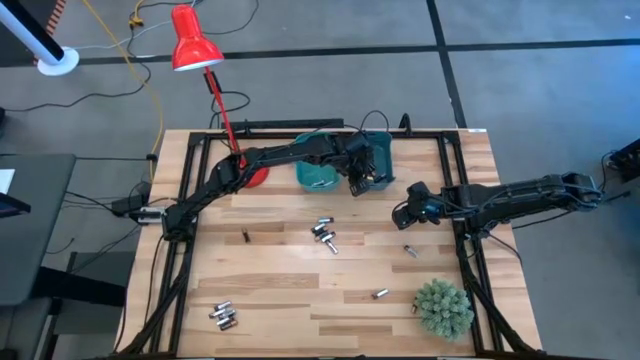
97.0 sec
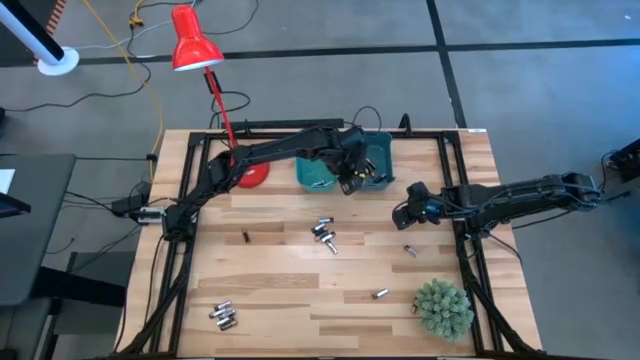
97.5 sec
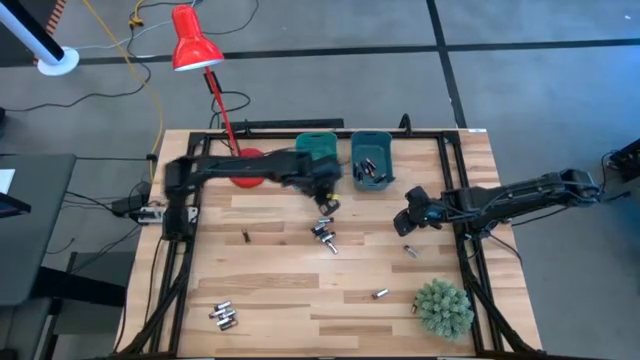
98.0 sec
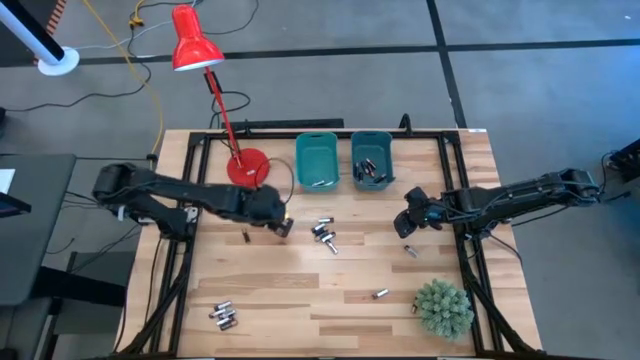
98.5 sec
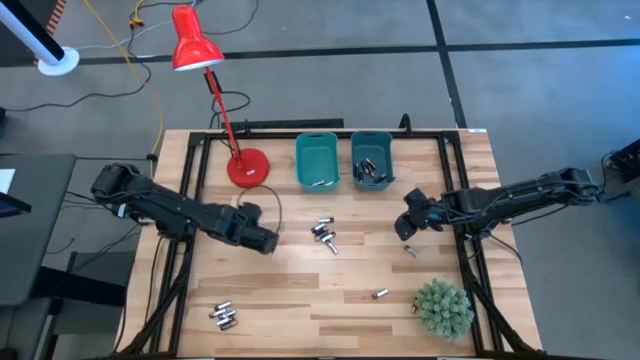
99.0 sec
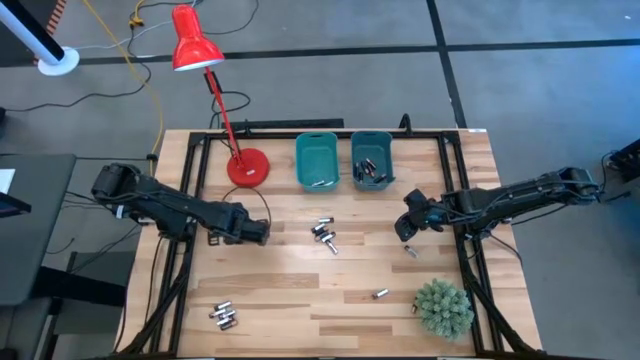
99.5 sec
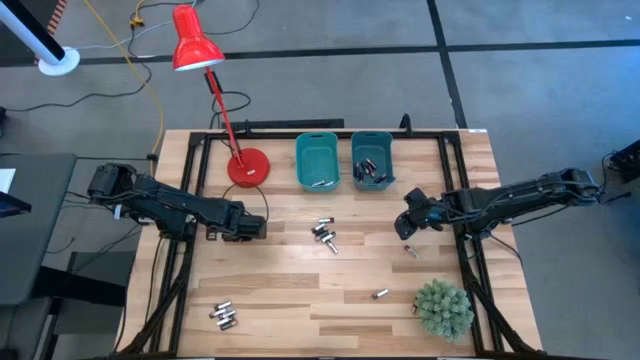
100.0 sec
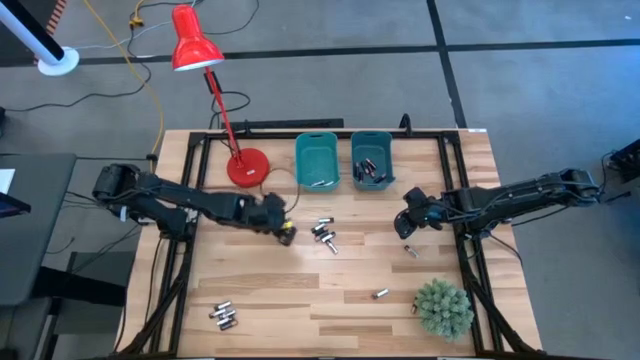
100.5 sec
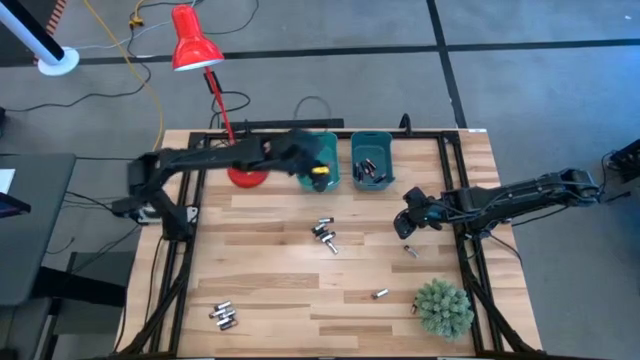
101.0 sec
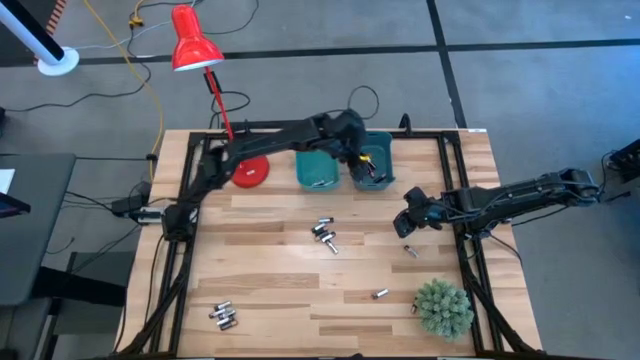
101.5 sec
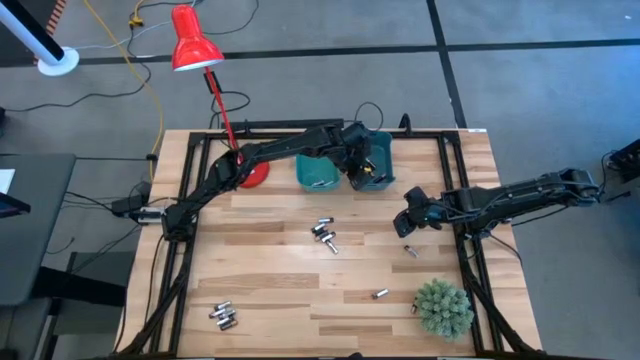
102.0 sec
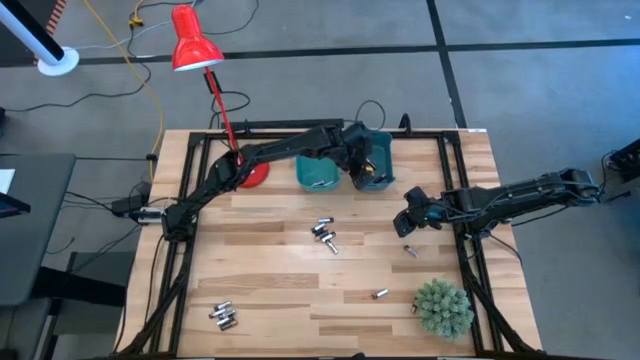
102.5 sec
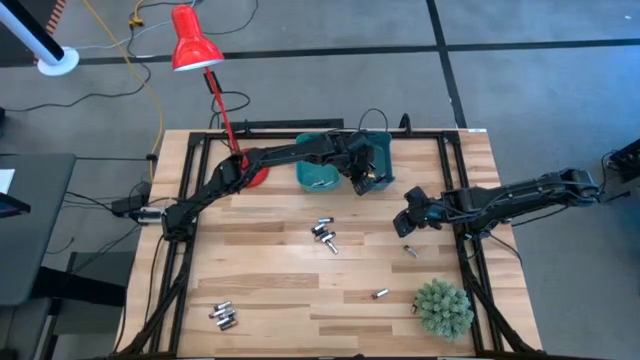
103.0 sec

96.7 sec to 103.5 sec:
Task: Sort batteries
Put the black battery into the blue bin

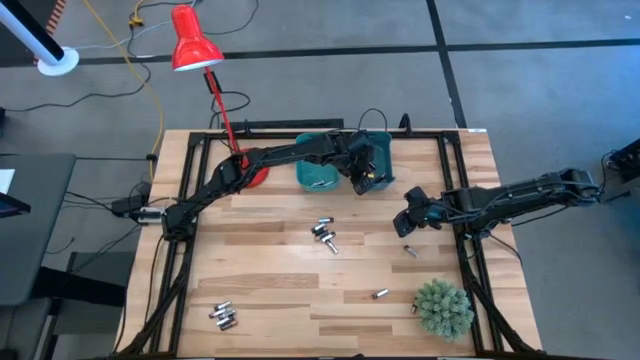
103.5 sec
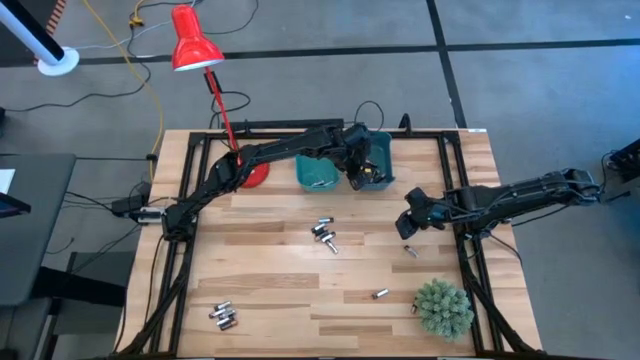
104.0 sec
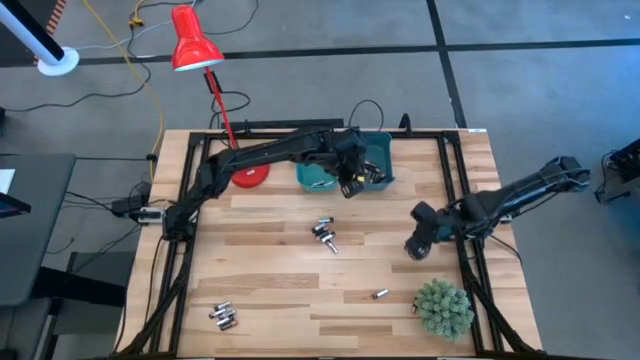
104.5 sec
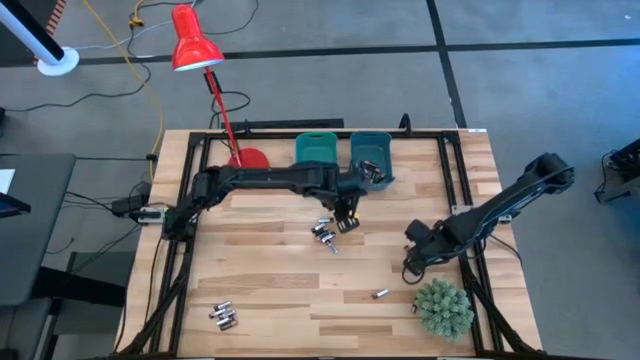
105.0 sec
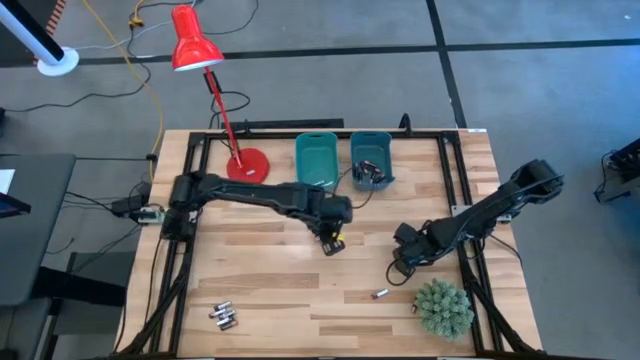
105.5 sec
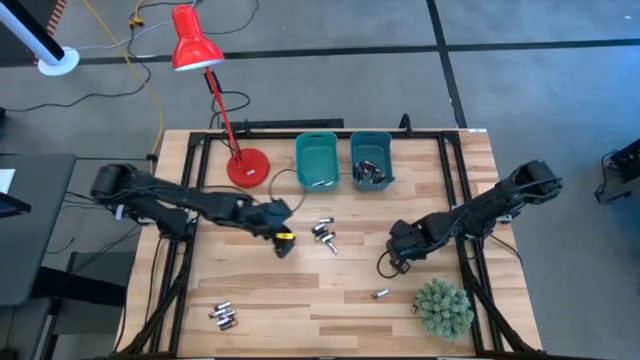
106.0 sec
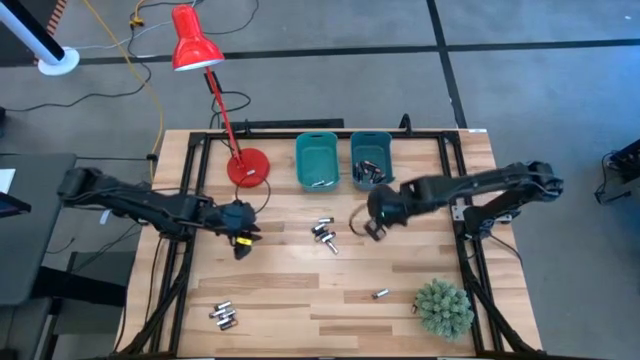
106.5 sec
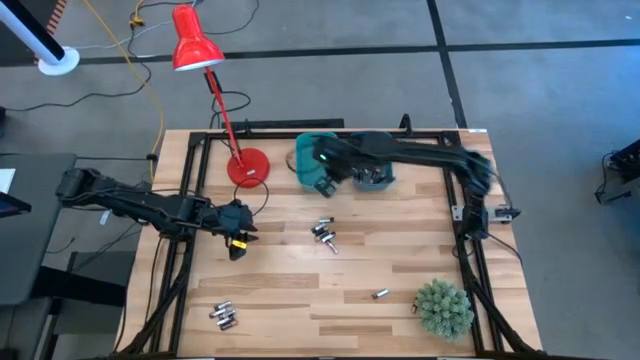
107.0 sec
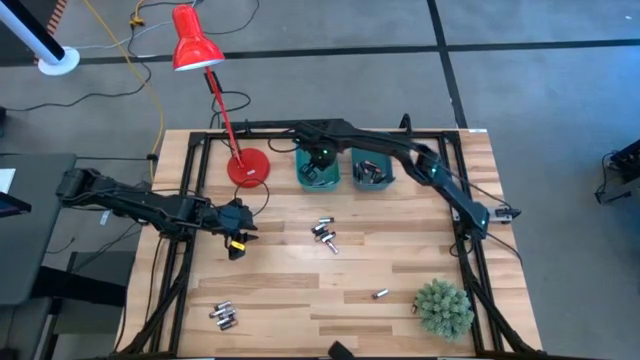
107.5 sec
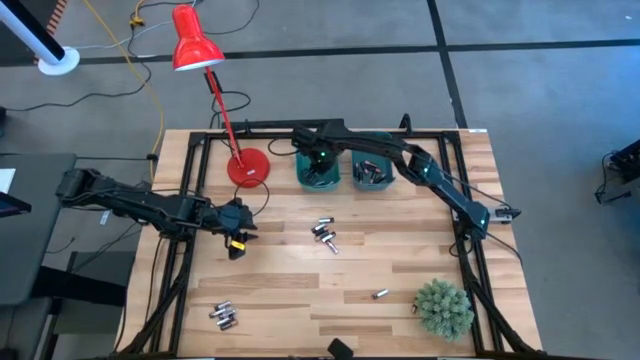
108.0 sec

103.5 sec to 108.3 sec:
Put the silver battery into the green bin

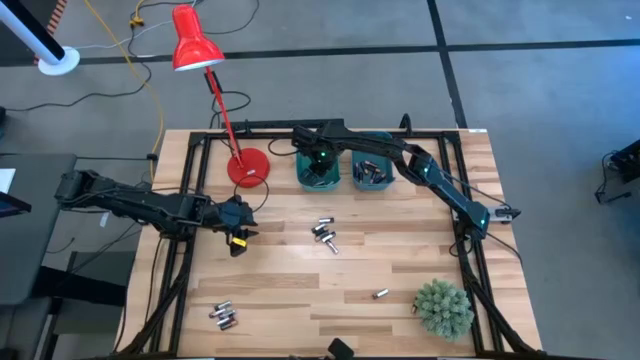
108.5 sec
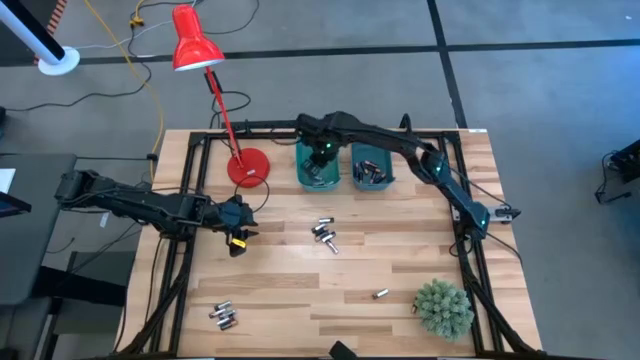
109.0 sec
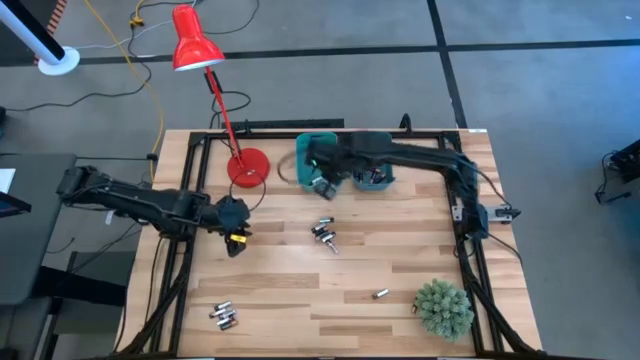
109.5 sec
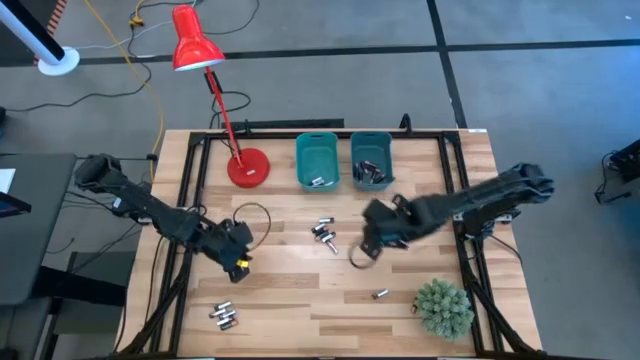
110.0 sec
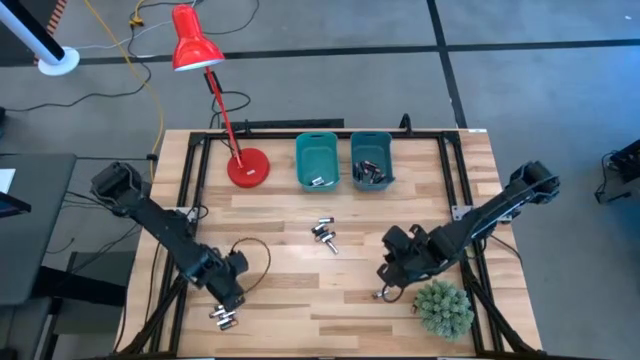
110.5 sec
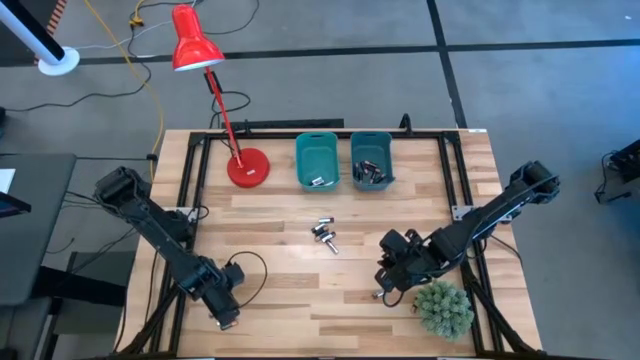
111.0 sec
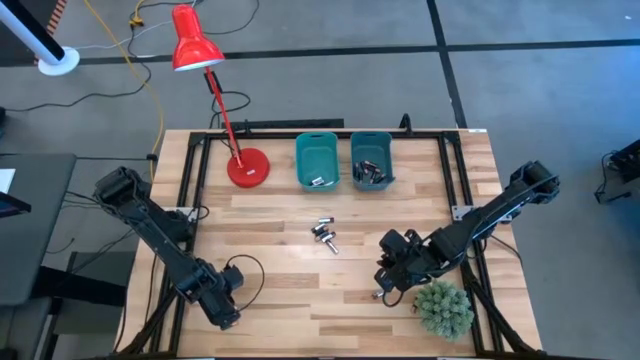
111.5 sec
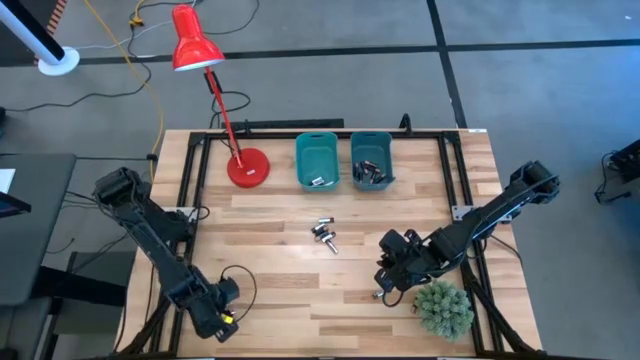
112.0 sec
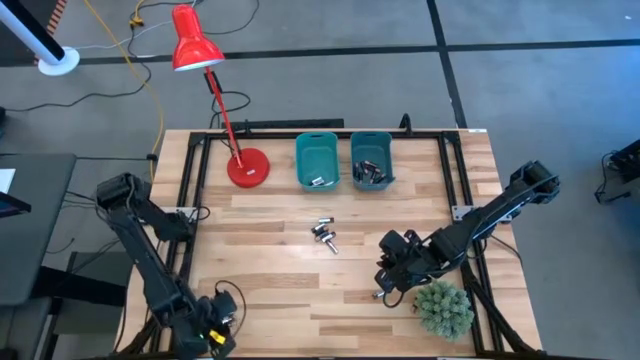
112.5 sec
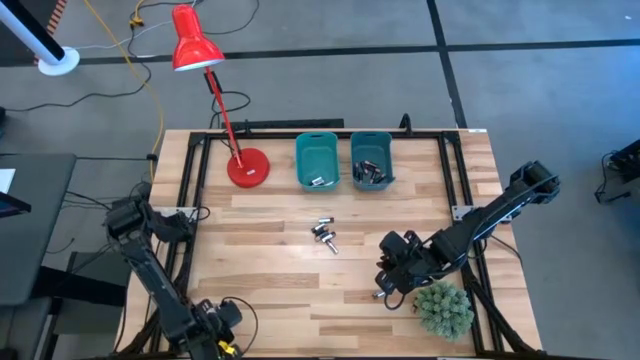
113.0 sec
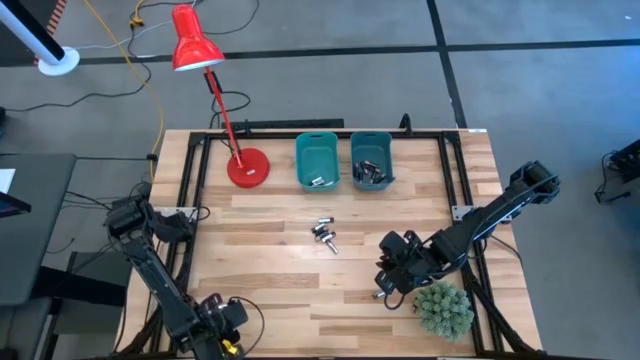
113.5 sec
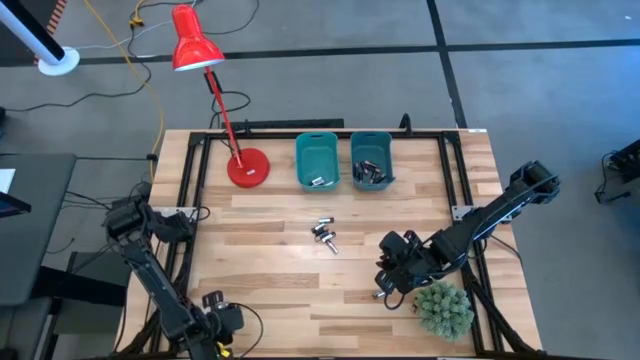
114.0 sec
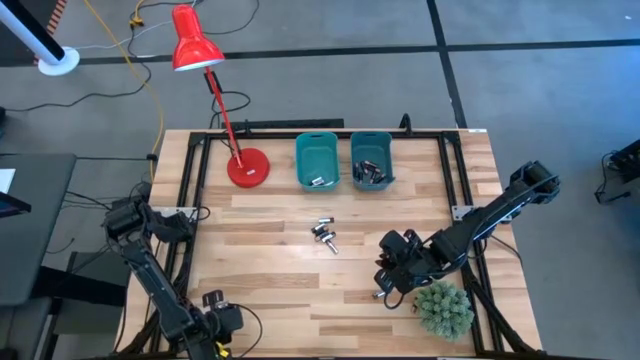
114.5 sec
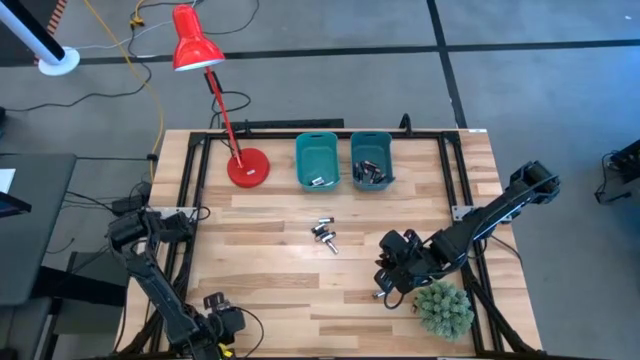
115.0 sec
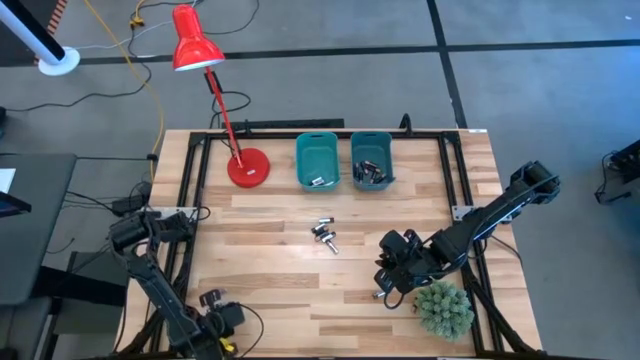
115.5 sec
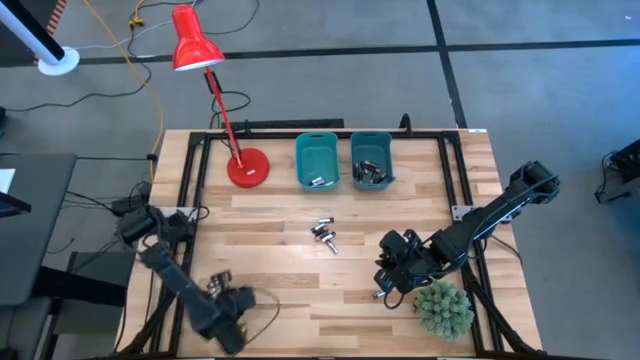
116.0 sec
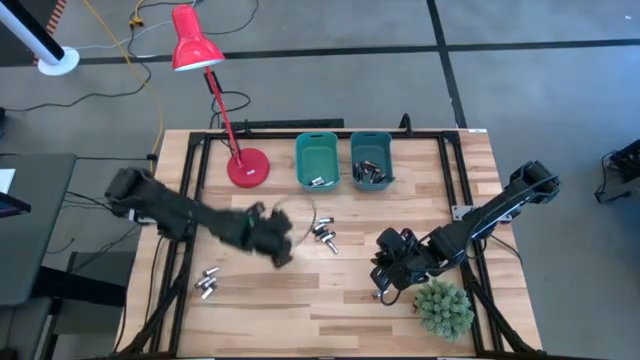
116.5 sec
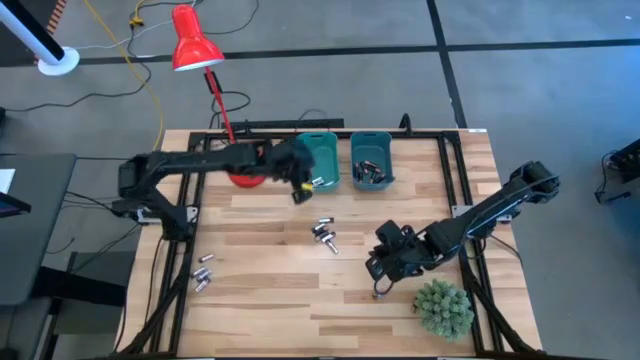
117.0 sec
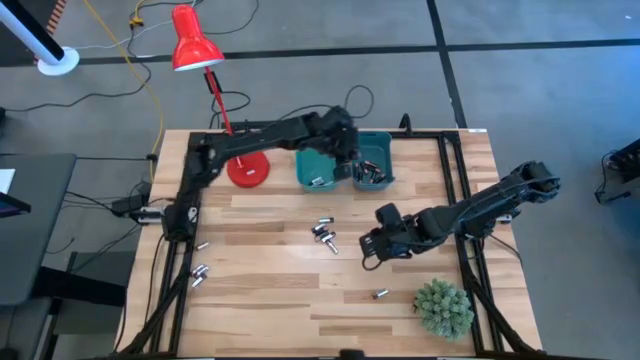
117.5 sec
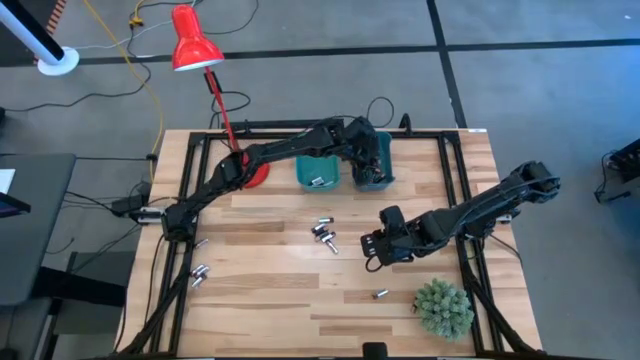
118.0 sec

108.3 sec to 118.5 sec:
Put the black battery into the blue bin
